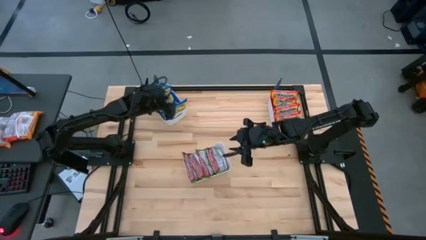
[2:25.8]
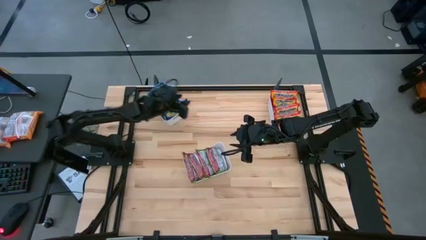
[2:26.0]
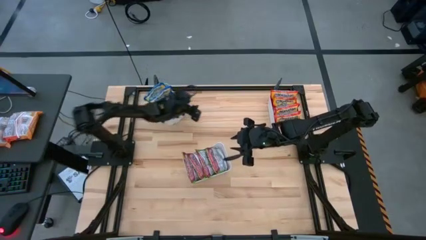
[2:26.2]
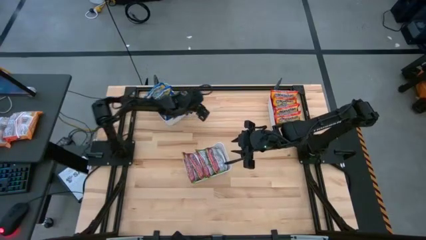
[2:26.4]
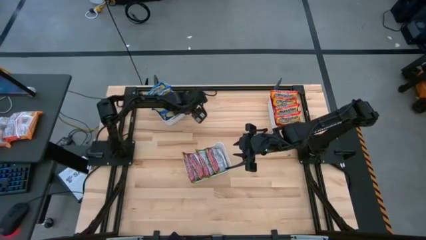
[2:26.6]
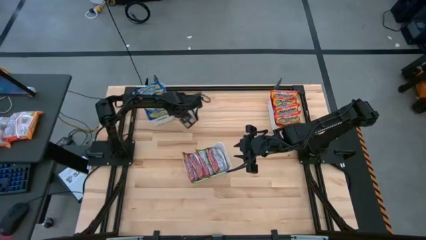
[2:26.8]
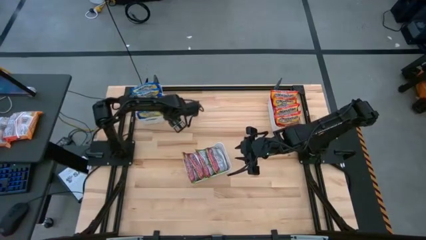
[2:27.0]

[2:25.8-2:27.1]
Task: Sort Maruchan noodles
Adjust the top left white bin on the table

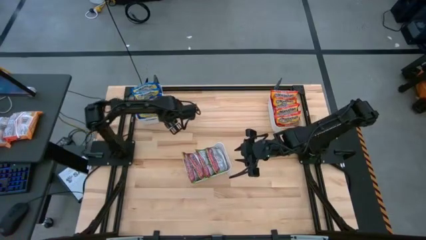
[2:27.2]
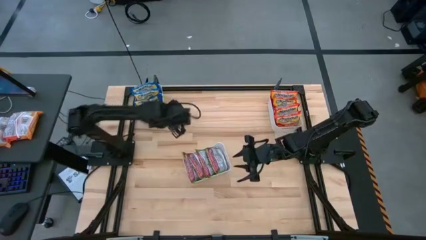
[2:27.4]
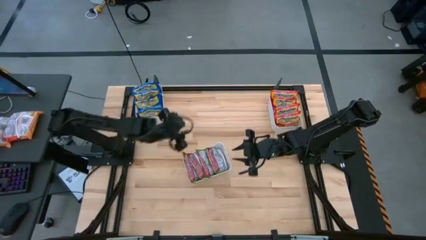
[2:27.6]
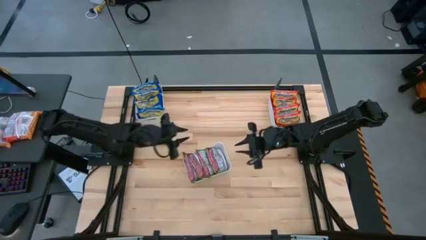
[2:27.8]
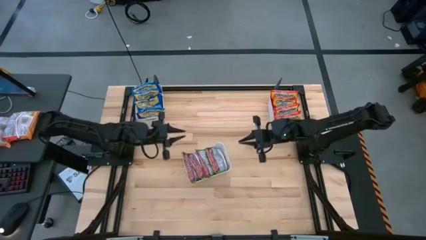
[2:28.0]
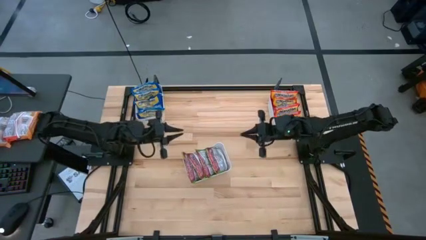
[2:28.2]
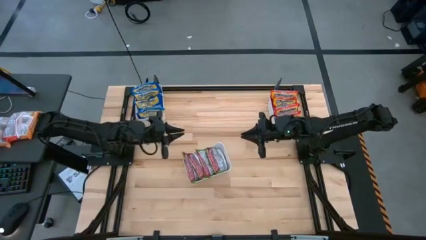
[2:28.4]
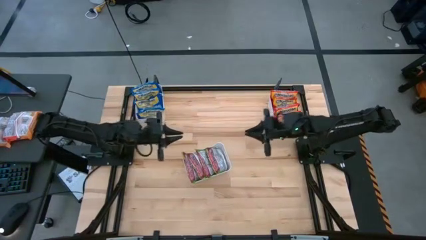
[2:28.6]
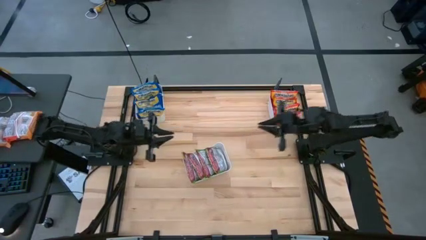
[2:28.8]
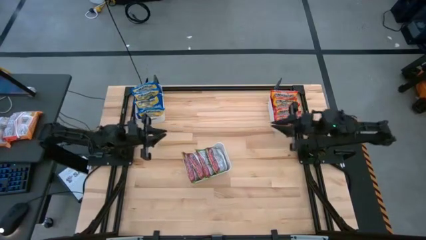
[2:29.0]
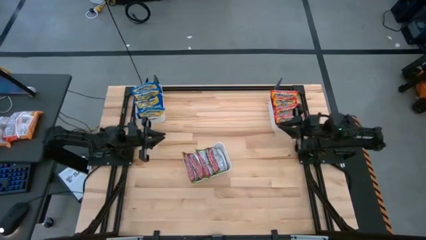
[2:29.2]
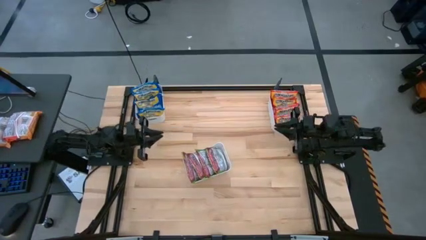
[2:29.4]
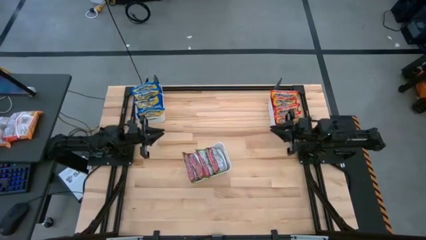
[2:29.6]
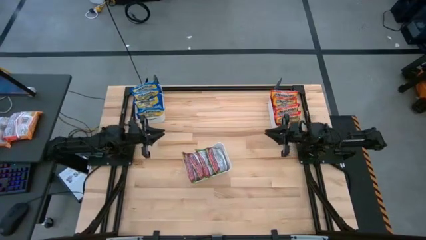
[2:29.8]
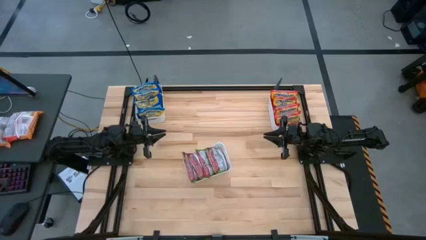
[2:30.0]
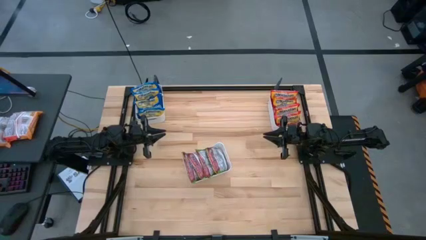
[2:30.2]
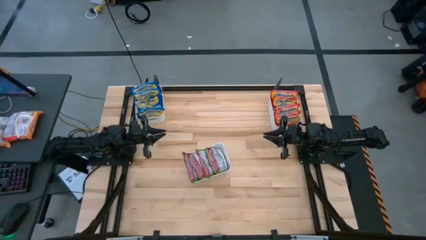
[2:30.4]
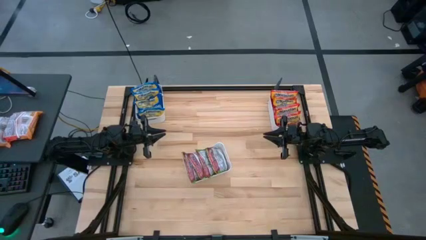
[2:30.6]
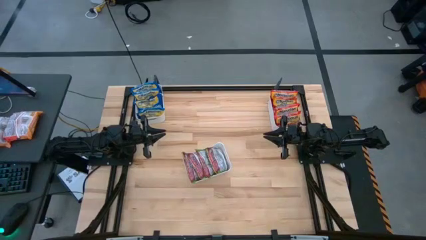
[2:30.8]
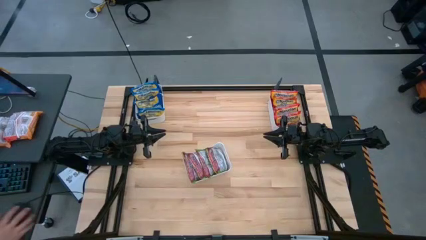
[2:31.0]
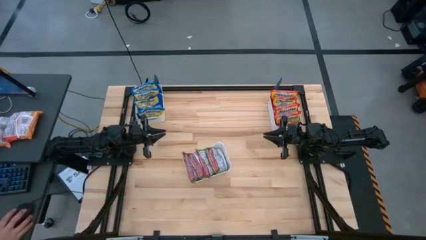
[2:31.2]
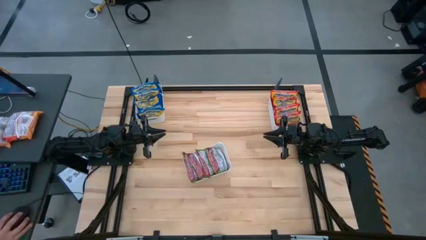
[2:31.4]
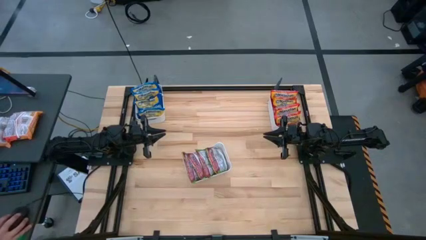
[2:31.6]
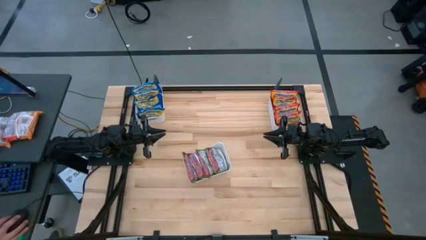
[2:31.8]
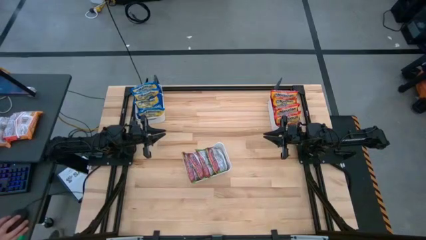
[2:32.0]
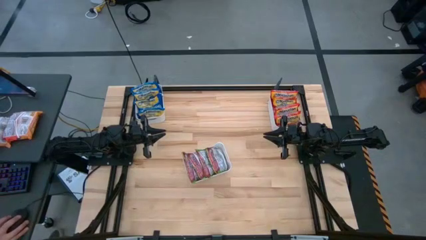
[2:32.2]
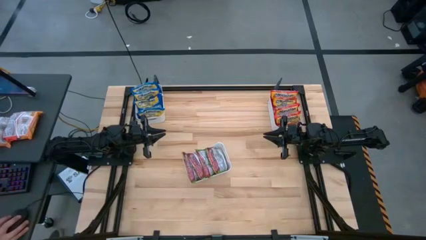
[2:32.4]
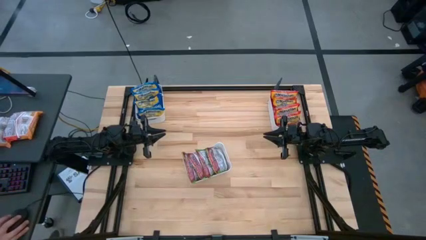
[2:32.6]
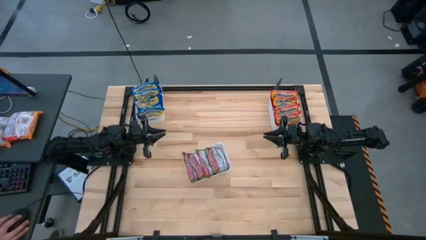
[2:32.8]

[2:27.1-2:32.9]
Return to Home Position

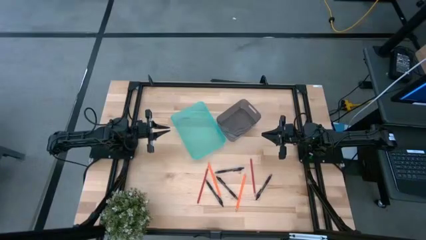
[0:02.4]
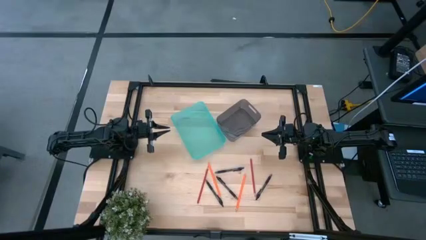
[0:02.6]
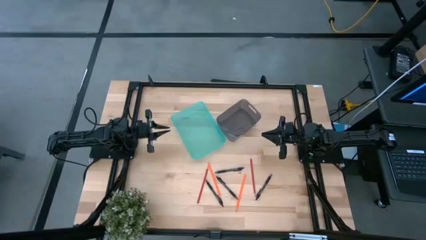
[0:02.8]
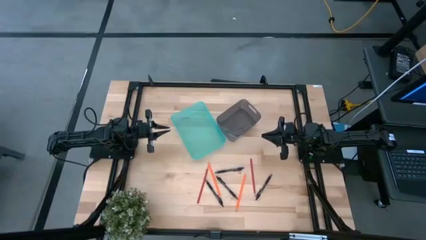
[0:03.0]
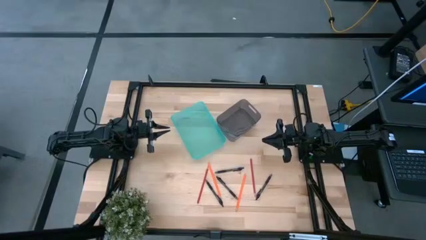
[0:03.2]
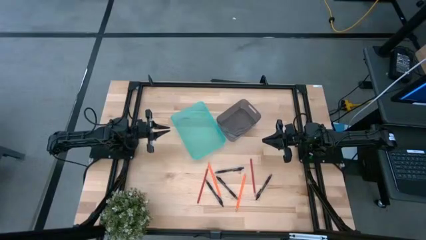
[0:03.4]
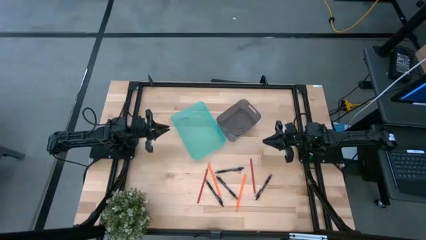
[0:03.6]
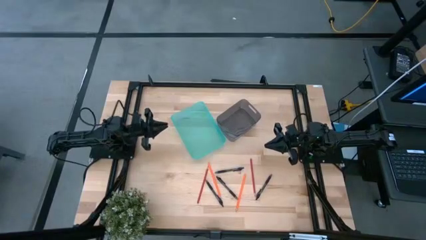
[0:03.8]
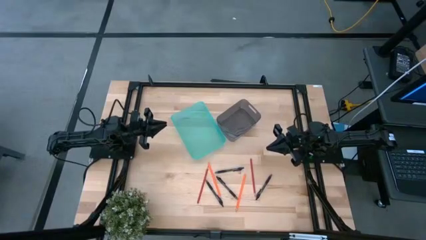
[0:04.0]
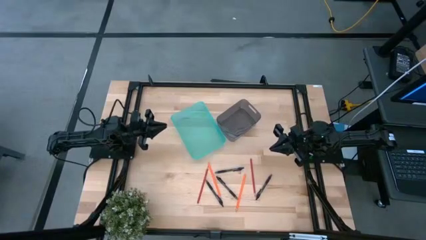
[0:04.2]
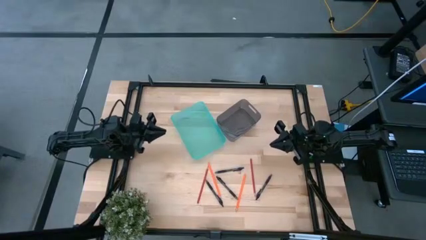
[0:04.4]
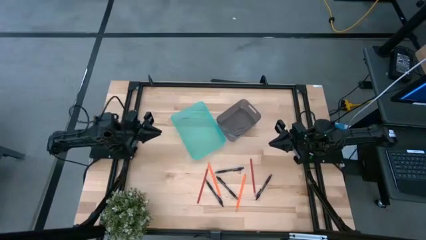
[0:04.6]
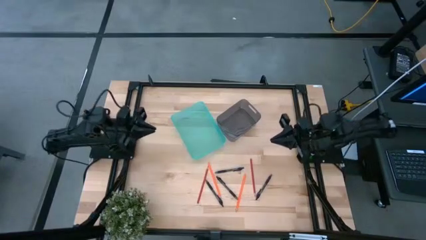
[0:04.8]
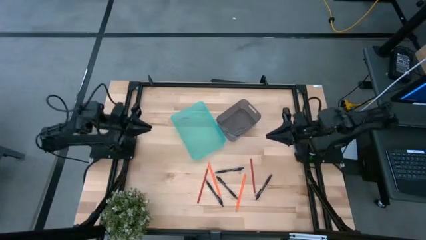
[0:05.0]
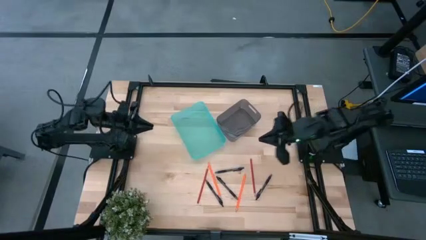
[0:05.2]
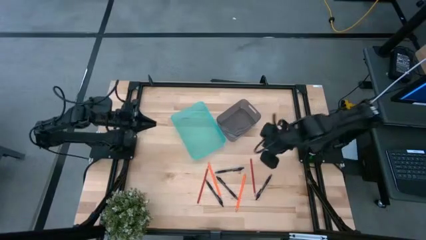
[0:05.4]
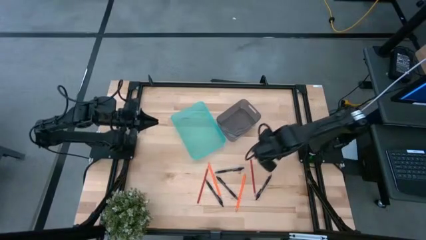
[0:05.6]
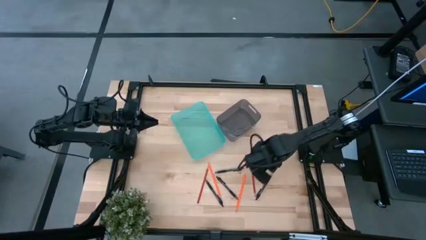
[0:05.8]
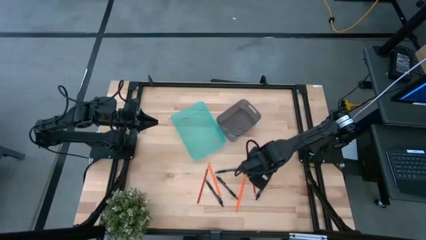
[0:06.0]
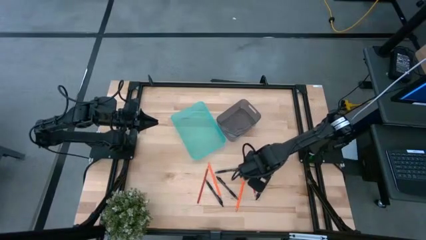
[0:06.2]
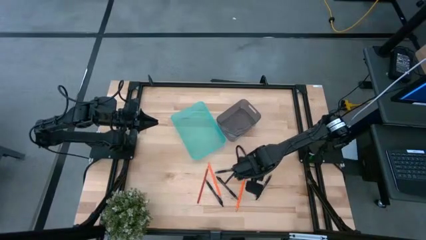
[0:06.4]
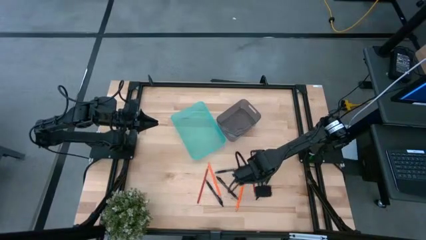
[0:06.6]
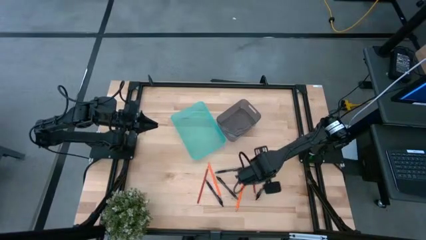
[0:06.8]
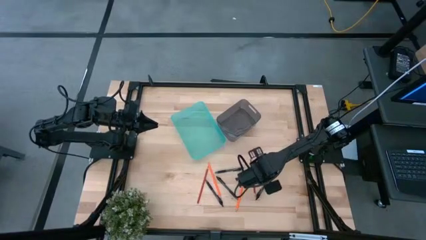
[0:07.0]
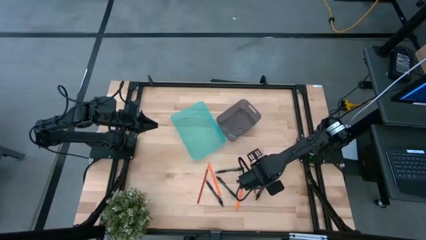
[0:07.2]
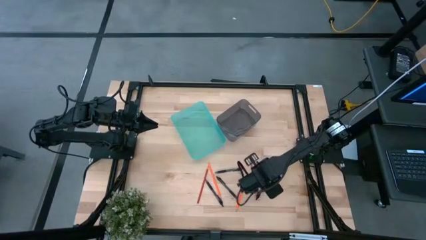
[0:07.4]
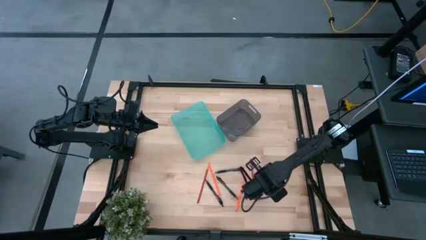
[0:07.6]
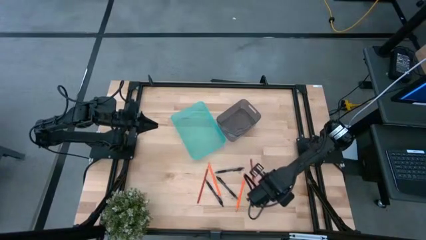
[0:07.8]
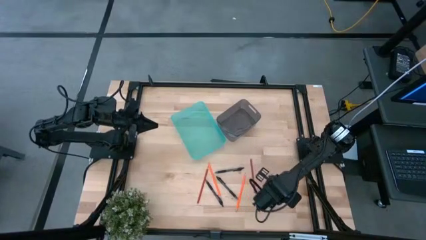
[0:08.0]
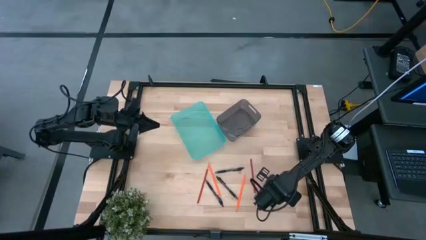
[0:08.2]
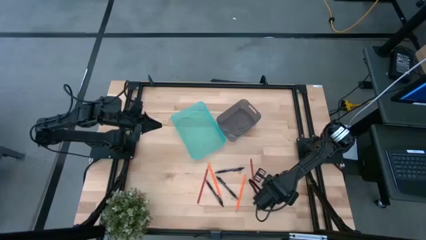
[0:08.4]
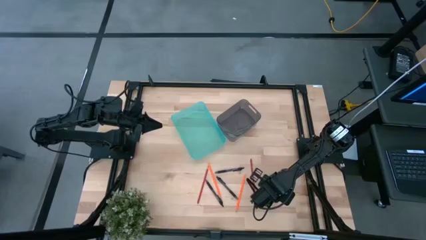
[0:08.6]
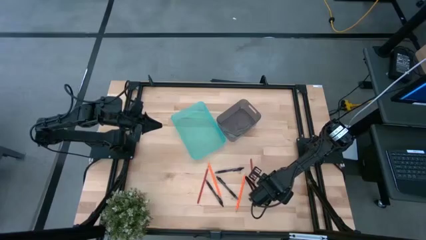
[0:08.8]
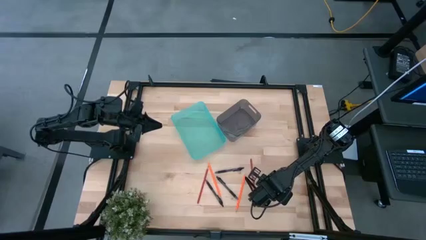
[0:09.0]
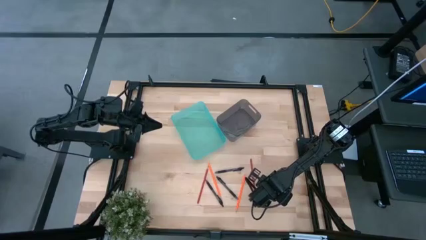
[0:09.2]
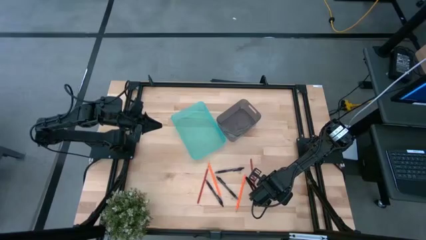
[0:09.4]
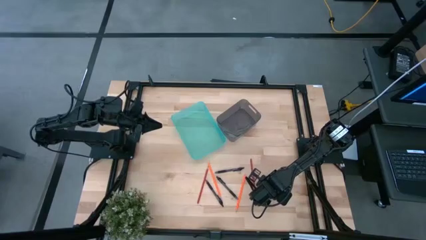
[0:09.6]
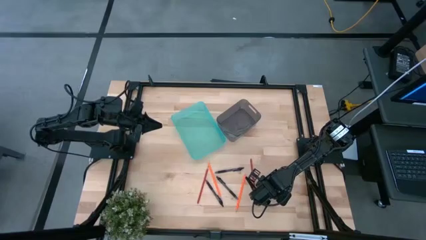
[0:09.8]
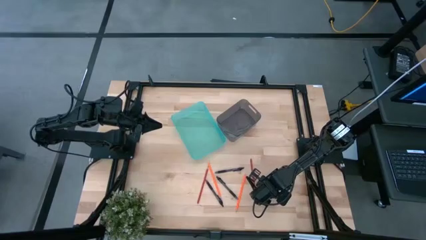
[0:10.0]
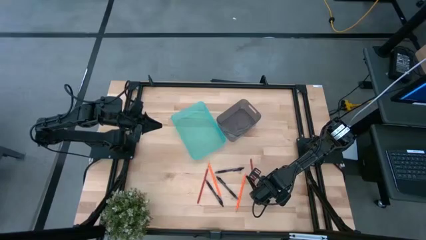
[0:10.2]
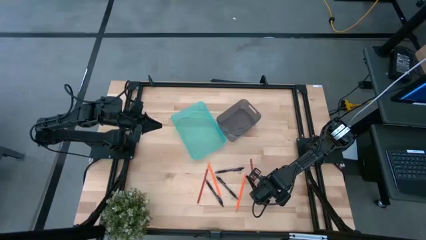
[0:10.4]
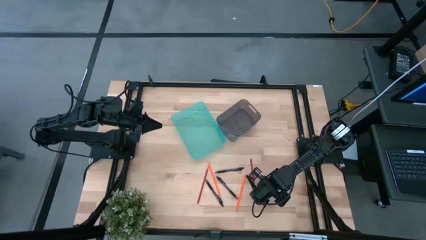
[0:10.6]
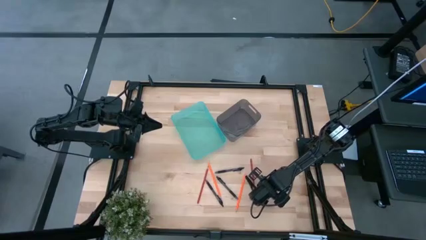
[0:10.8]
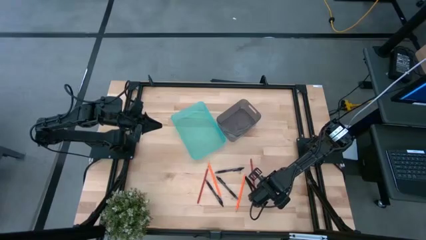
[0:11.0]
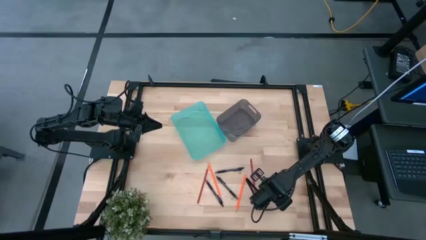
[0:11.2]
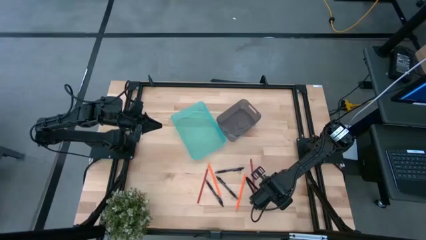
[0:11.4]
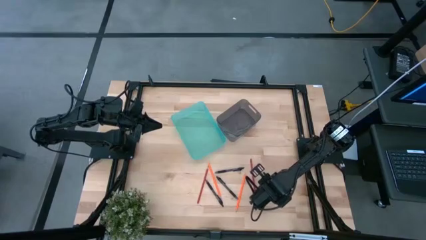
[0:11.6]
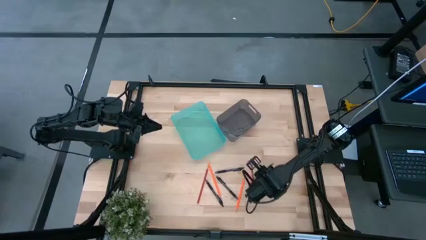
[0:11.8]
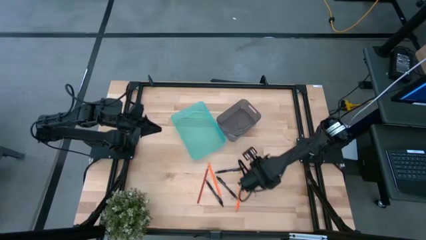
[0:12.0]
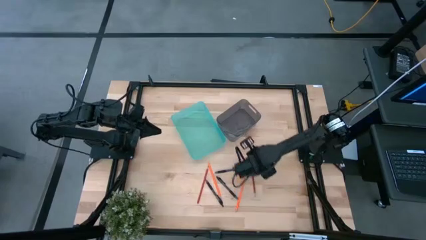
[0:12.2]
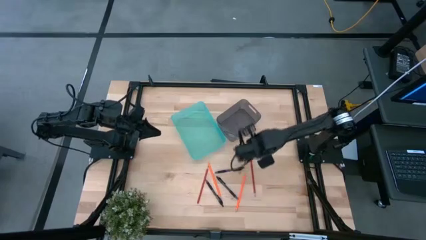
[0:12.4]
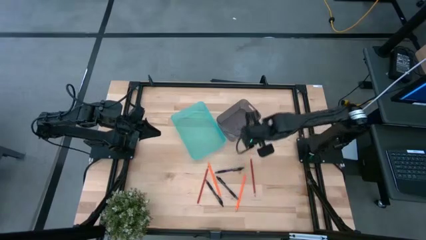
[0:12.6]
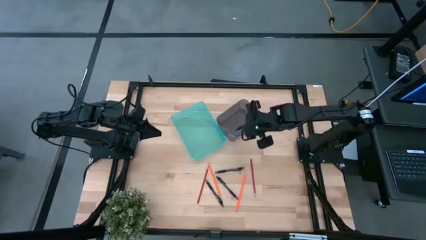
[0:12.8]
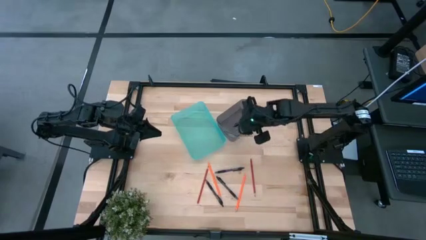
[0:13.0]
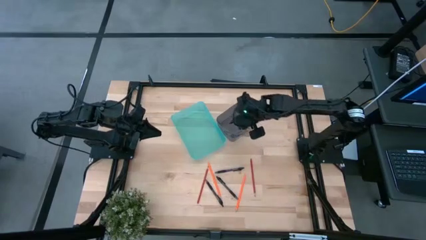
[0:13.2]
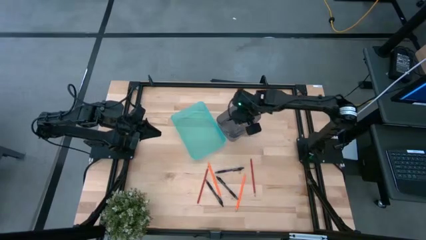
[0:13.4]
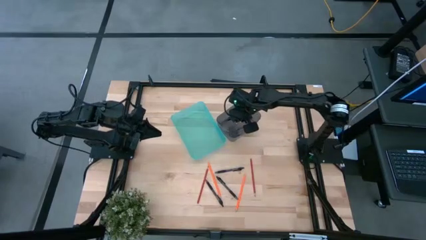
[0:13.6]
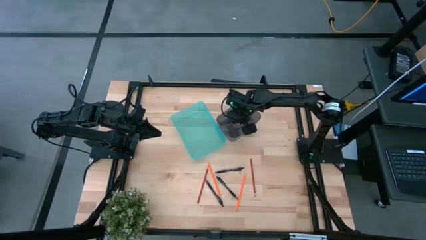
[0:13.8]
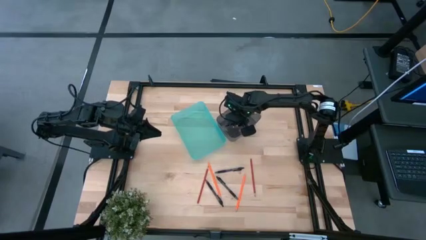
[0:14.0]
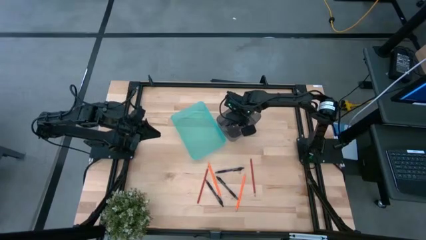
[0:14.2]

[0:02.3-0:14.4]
Task: Sort pens & pencils
Put the right black pen into the black bin
